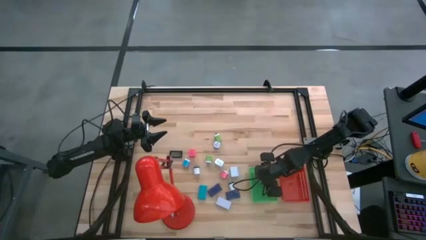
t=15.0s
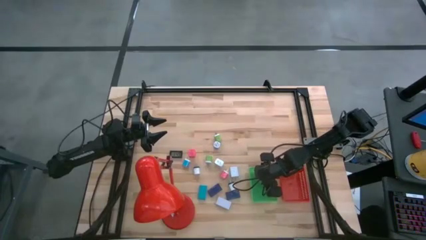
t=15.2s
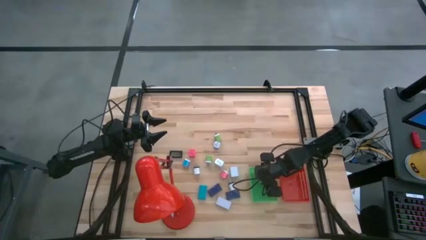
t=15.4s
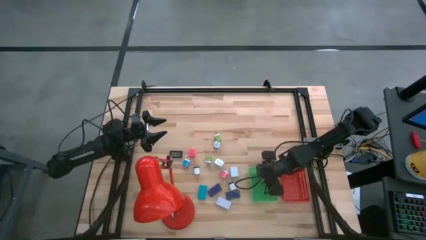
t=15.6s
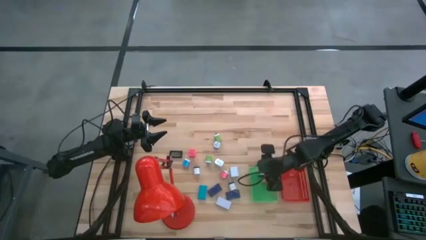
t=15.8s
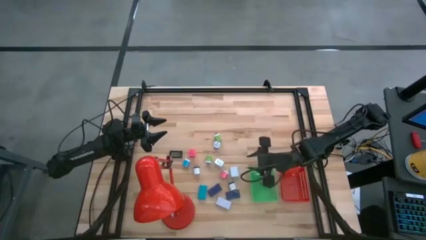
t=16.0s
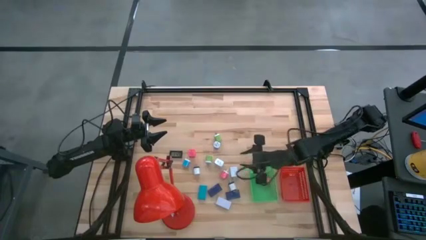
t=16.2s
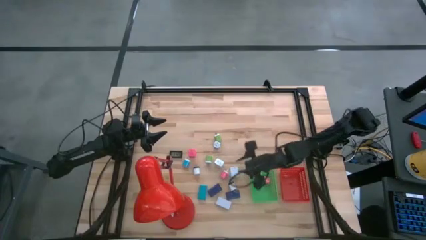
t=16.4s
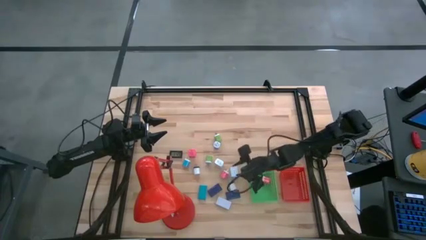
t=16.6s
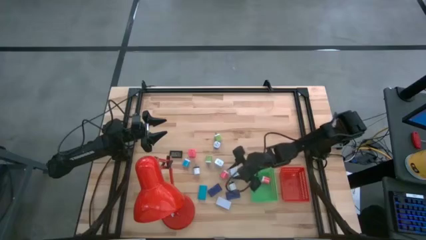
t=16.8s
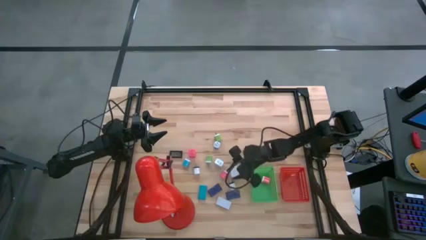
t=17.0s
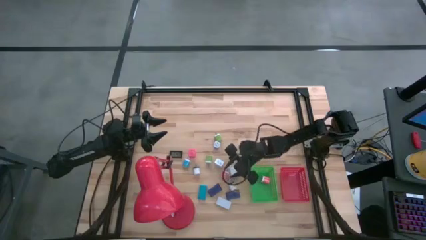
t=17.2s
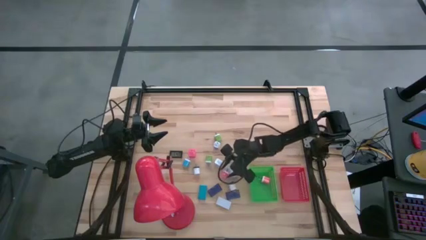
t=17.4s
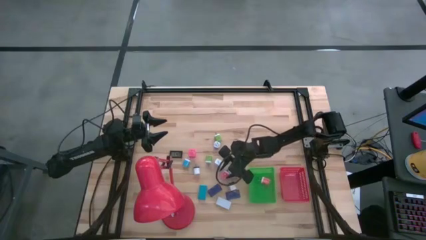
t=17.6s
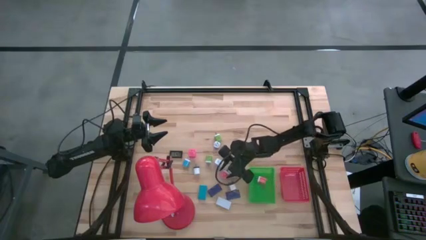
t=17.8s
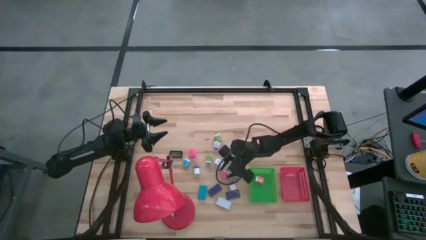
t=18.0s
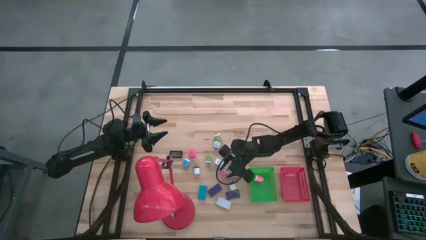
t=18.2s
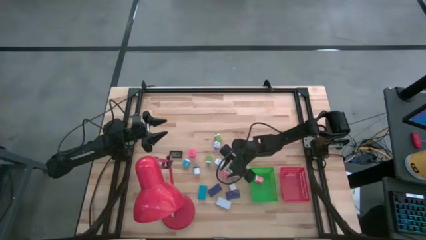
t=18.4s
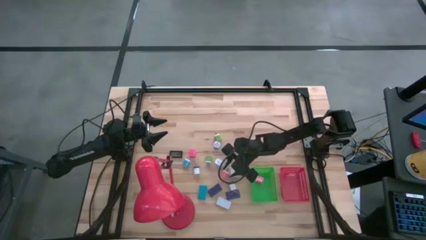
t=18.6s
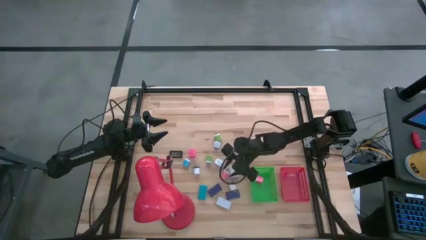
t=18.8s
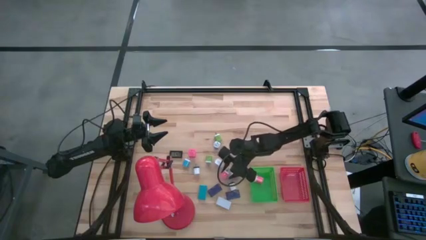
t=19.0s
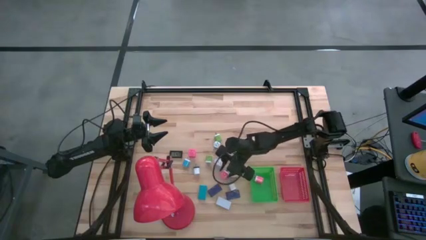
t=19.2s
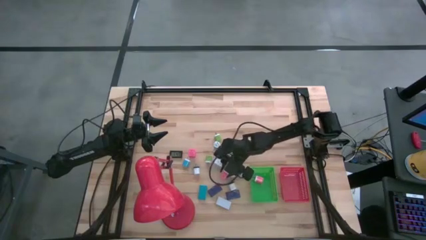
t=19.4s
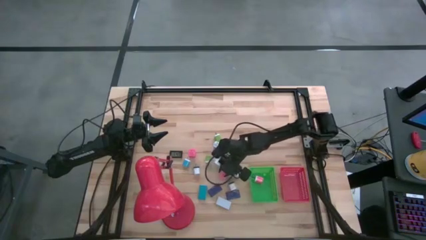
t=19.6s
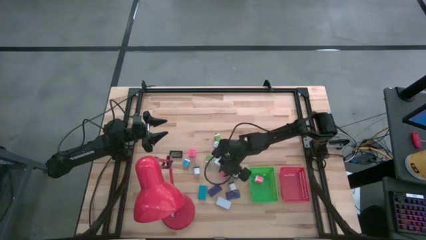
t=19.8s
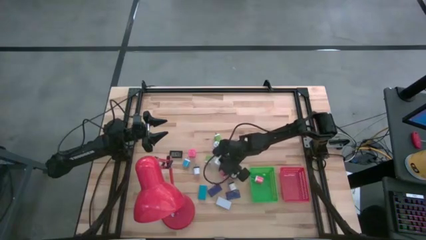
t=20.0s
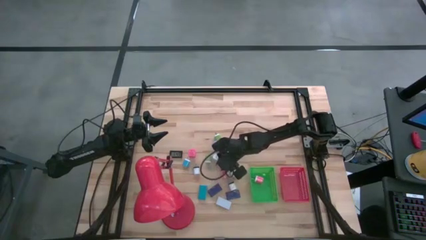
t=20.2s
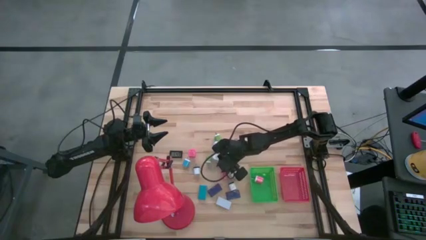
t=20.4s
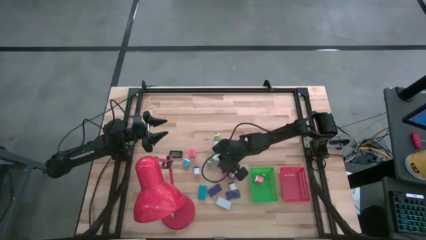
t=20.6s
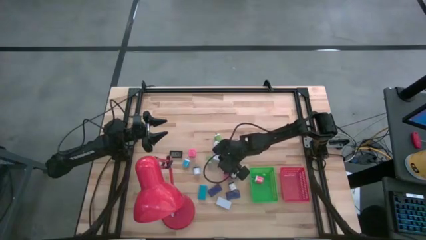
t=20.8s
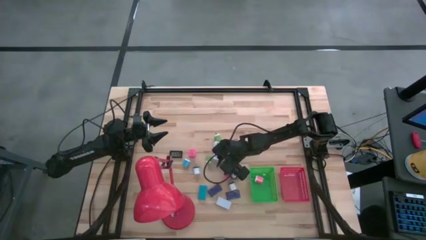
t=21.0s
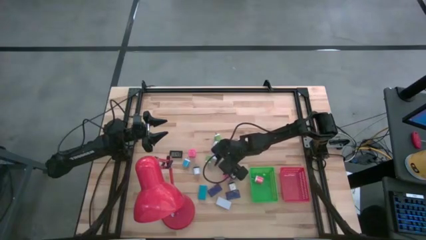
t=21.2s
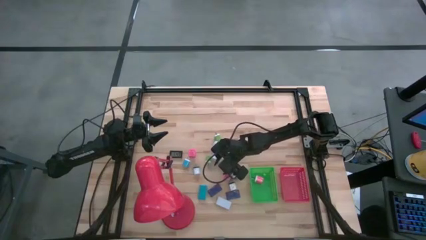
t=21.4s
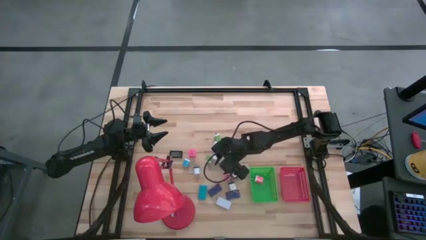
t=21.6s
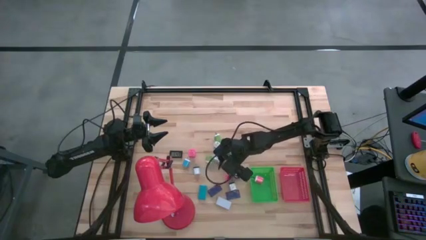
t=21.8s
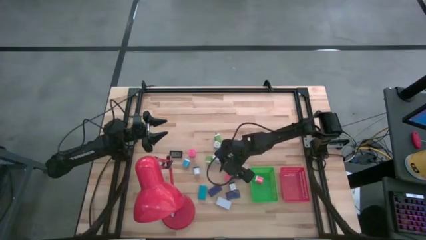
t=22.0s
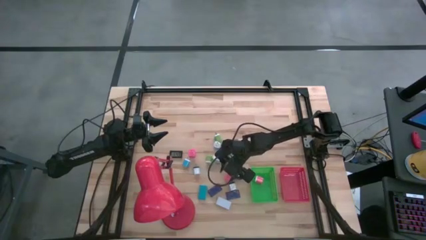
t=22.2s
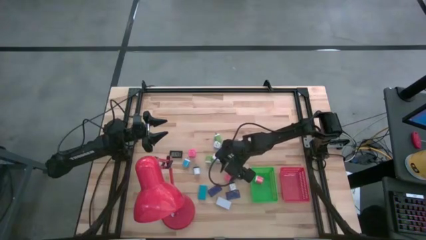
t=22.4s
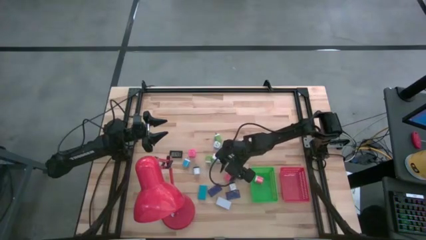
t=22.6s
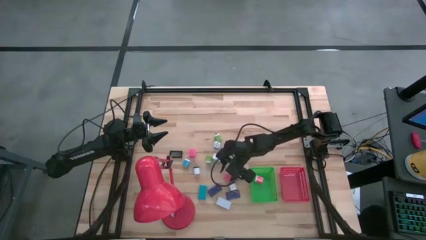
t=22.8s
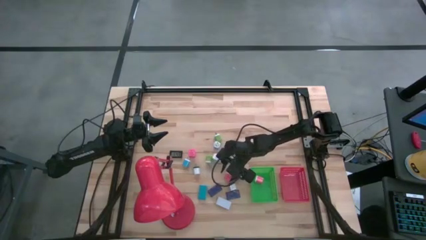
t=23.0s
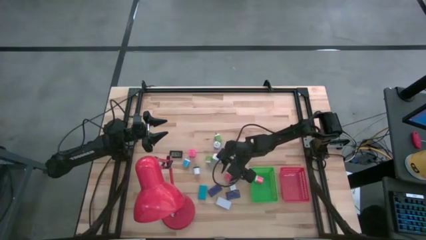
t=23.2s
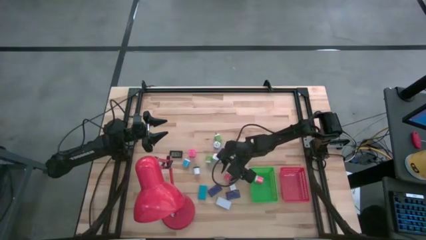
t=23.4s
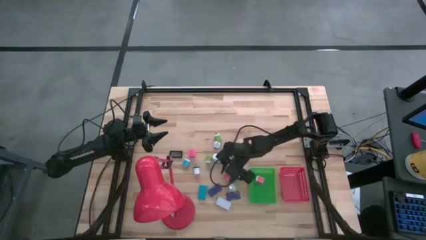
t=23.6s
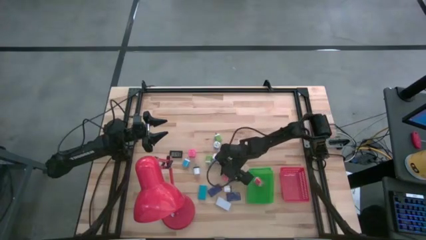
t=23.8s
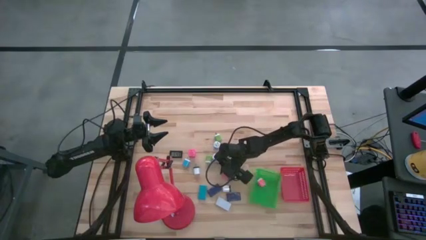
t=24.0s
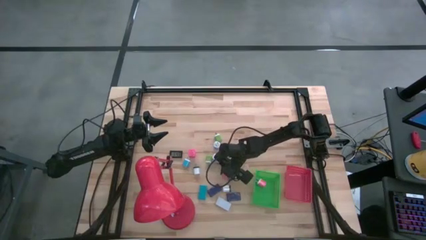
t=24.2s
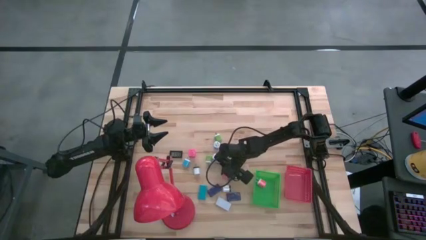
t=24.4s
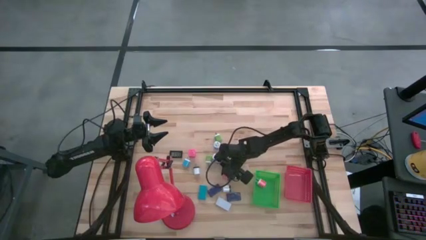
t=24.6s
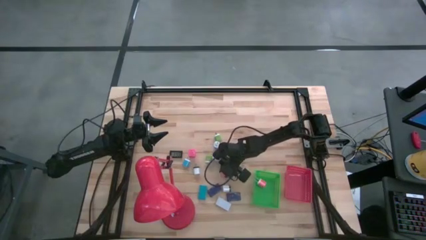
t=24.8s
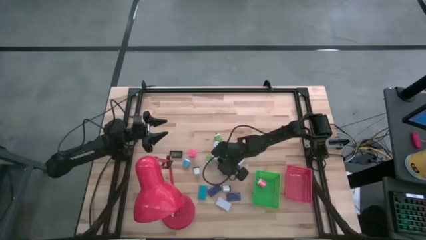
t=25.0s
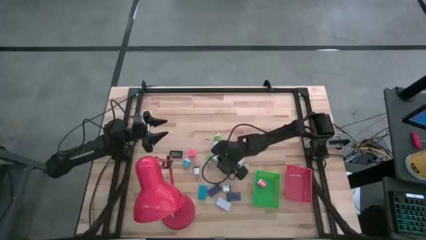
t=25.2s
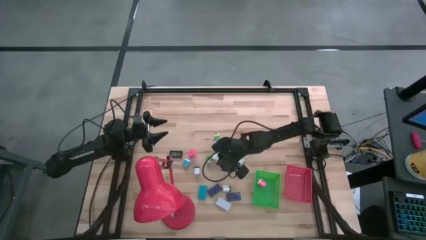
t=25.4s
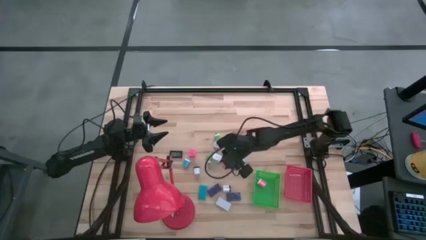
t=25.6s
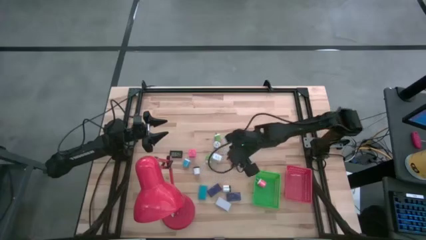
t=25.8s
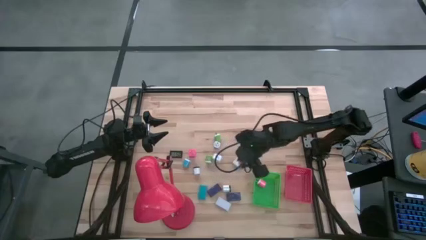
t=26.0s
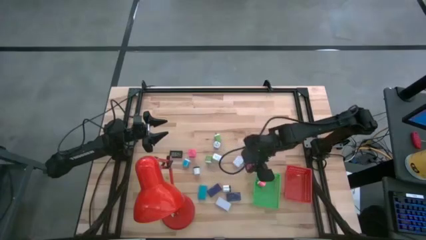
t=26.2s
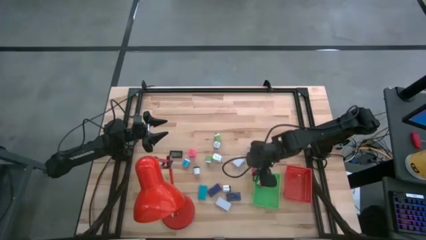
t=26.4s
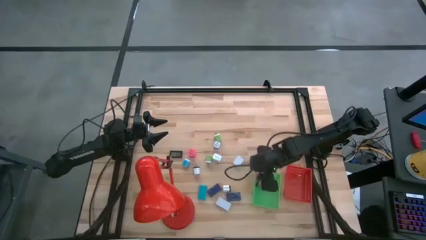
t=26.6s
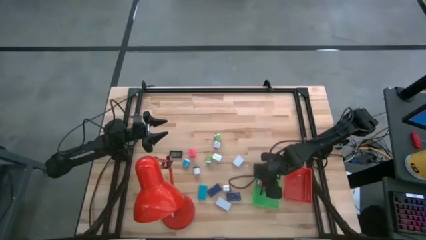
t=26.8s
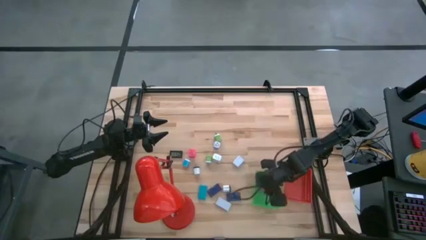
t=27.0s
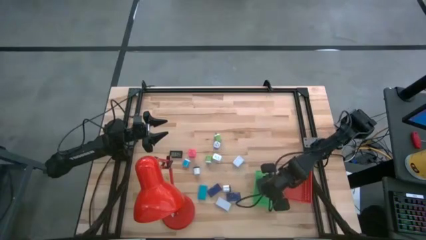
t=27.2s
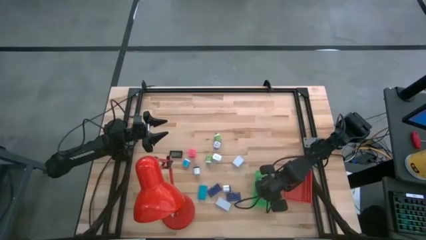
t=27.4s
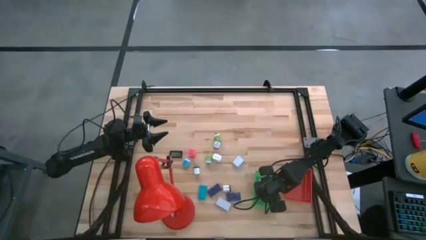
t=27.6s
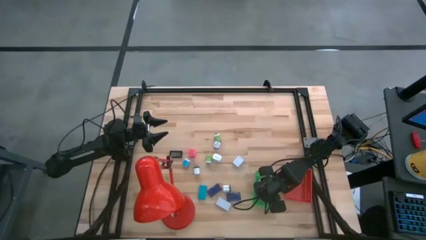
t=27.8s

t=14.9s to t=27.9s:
Task: Pick & Place Office items
Put the pink charger adapter into the green basket
